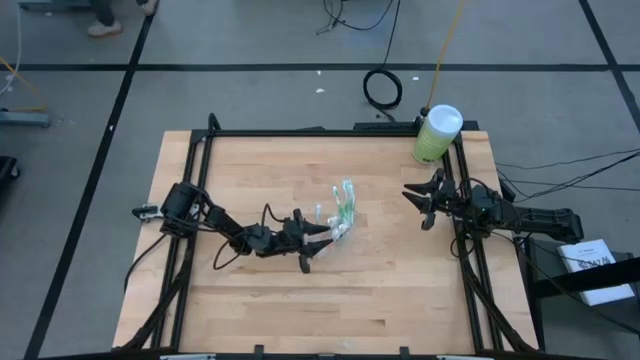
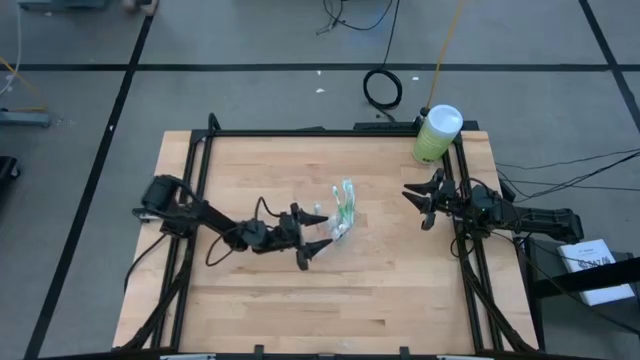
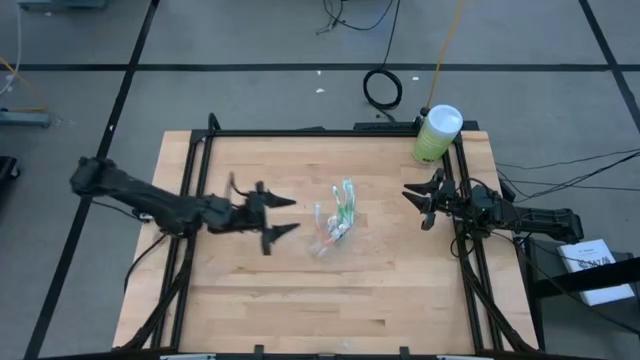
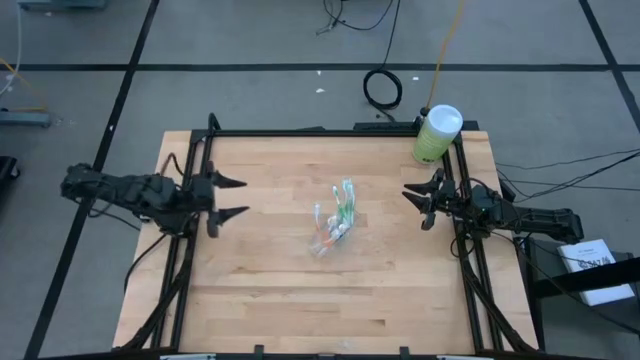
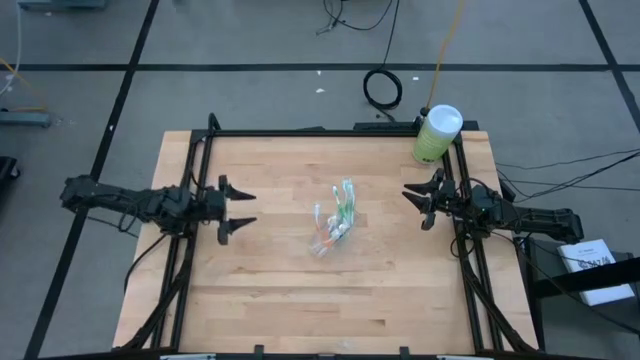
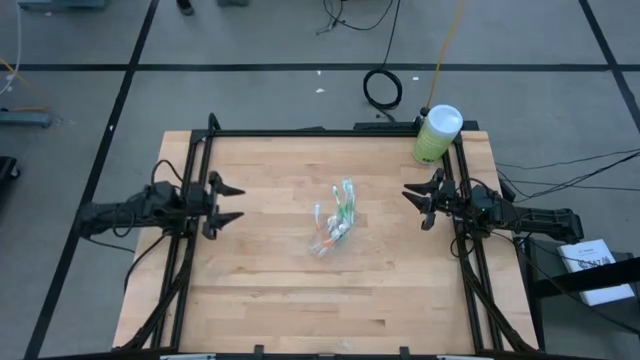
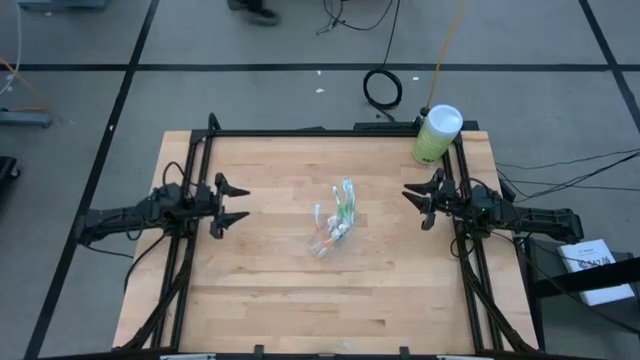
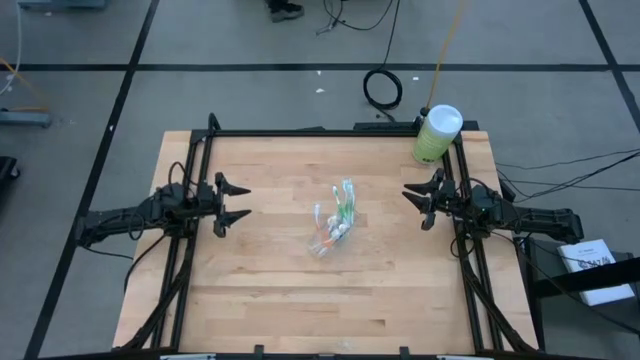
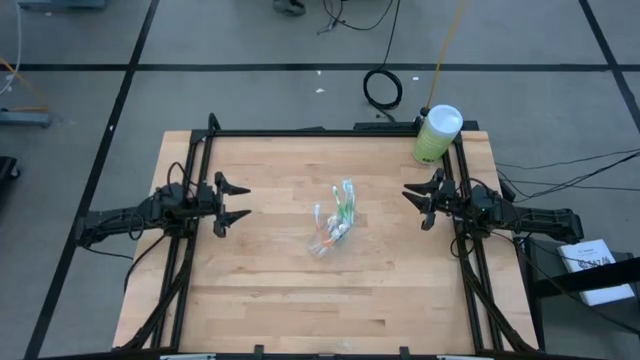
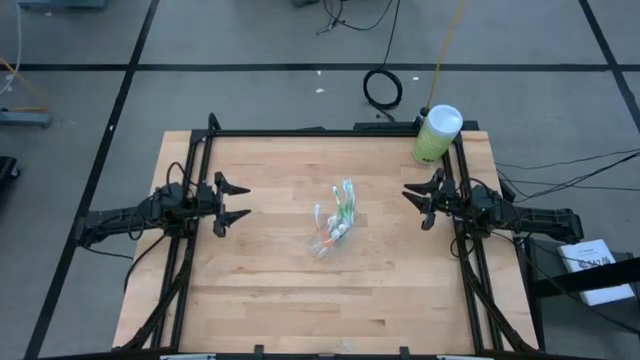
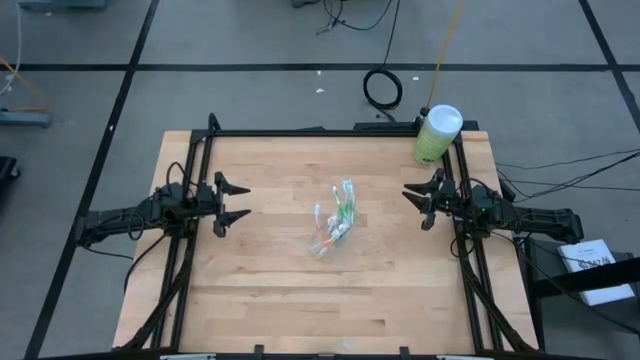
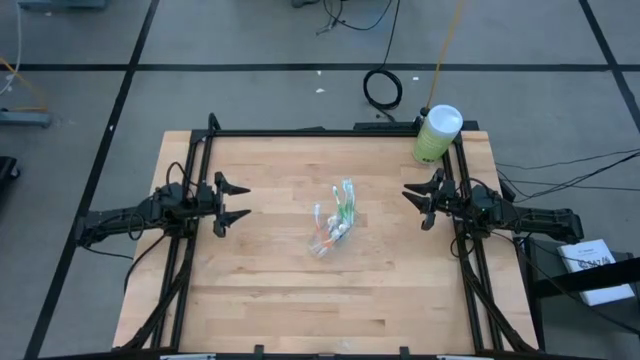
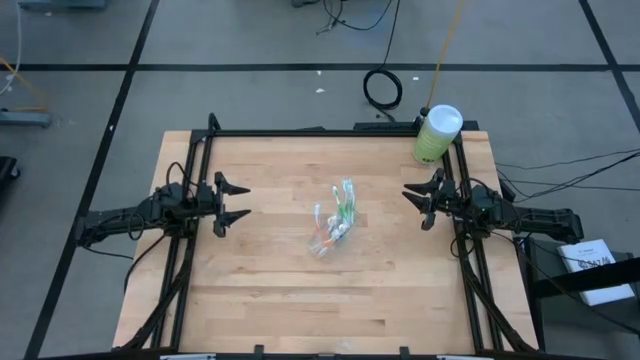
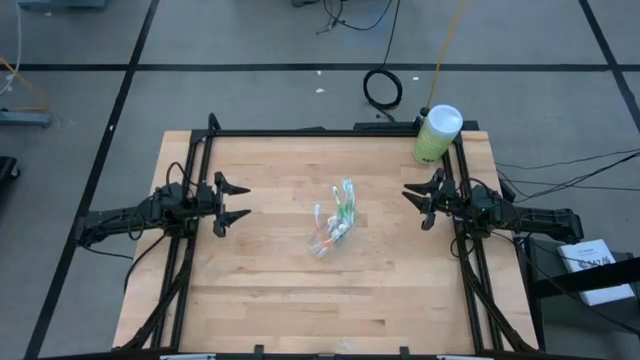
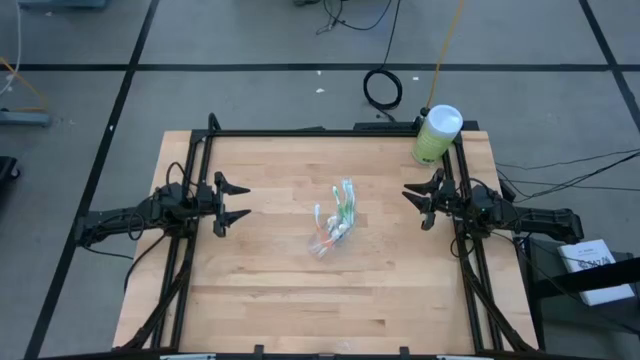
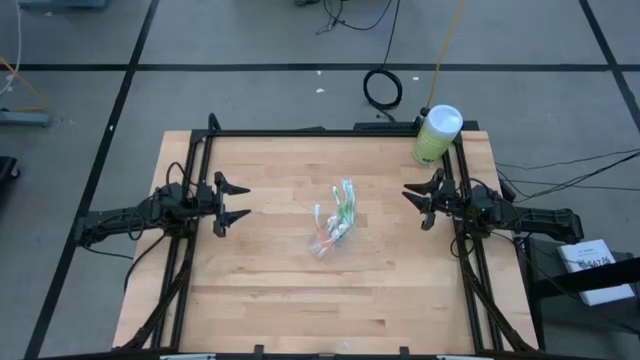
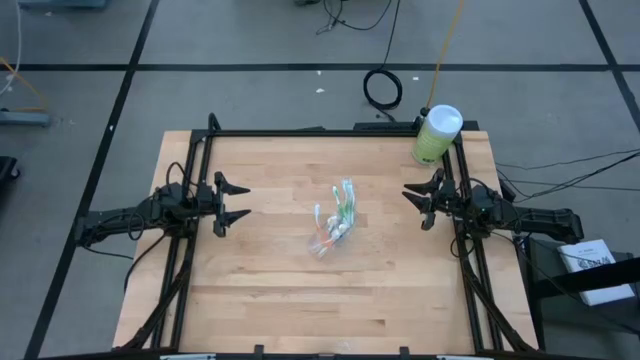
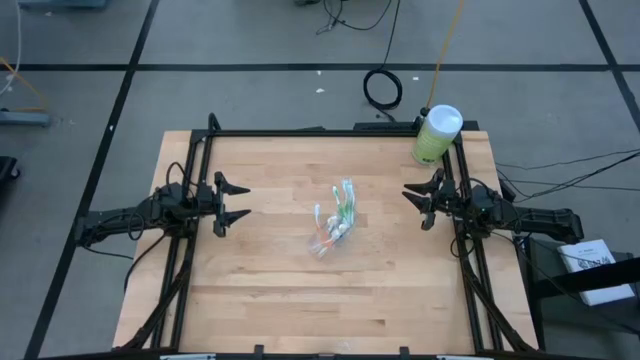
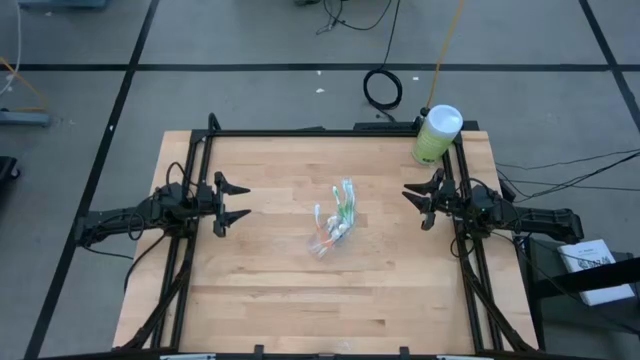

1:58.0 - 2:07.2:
Task: Pick & Place toothbrushing station
Return to Home Position

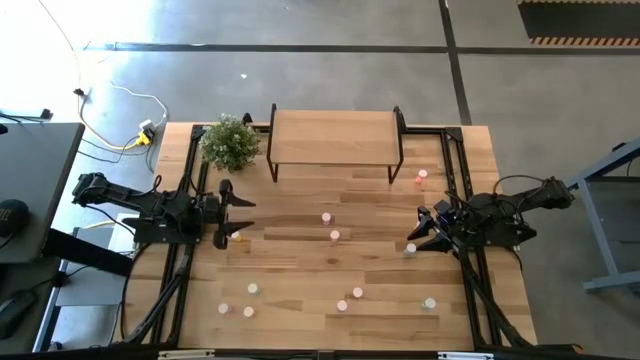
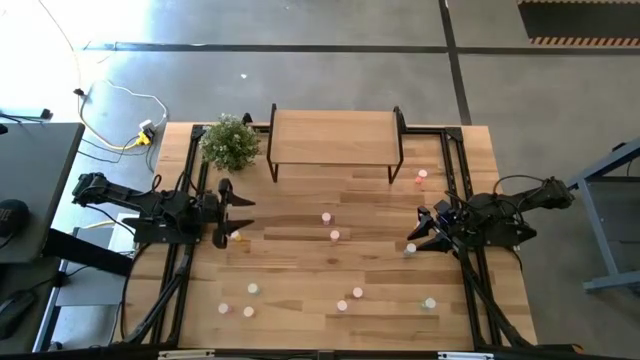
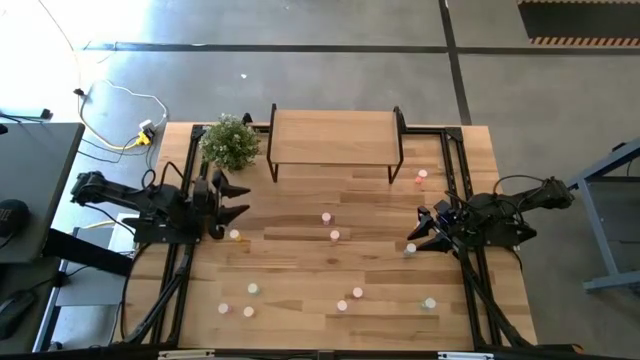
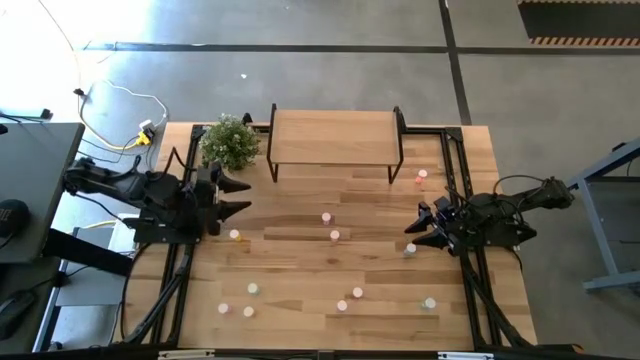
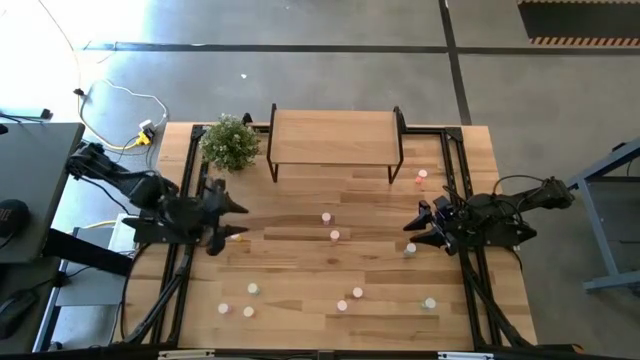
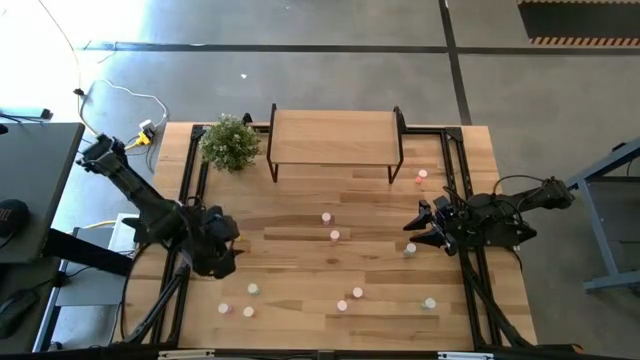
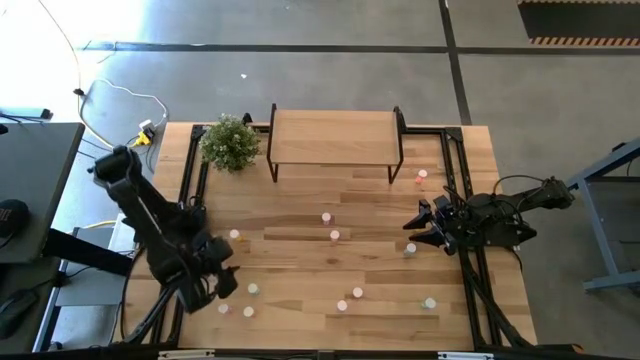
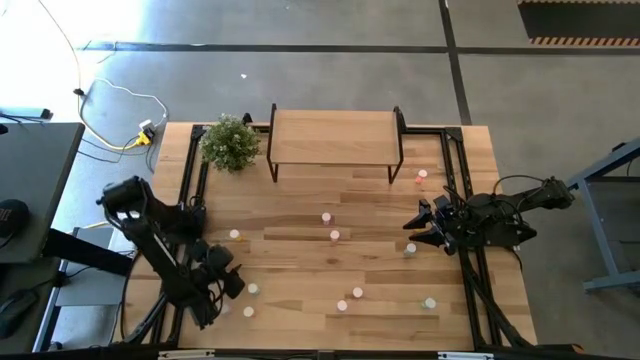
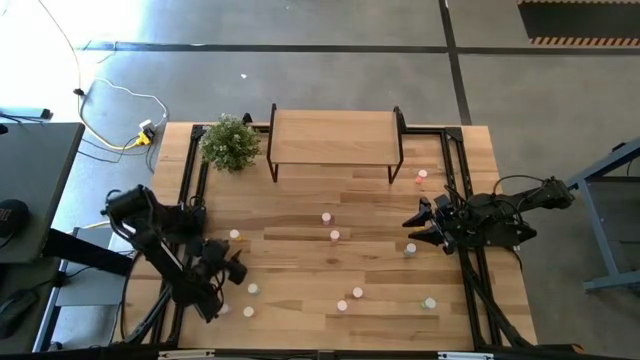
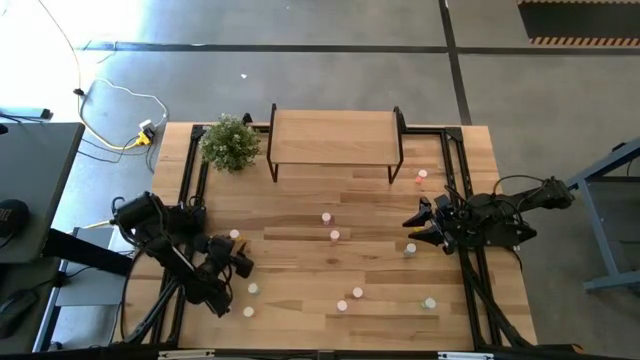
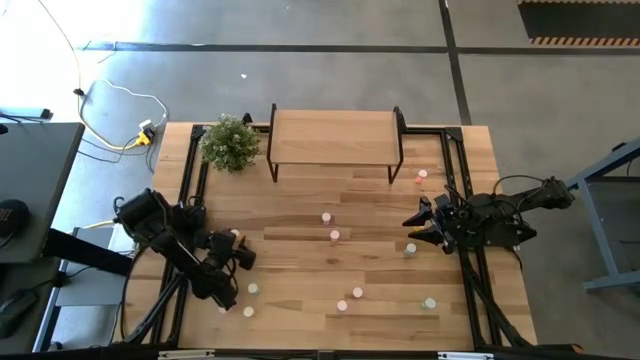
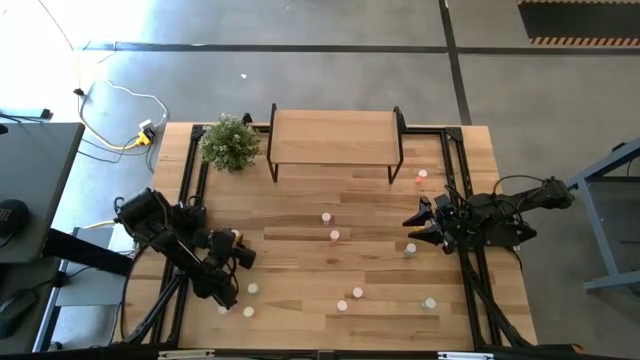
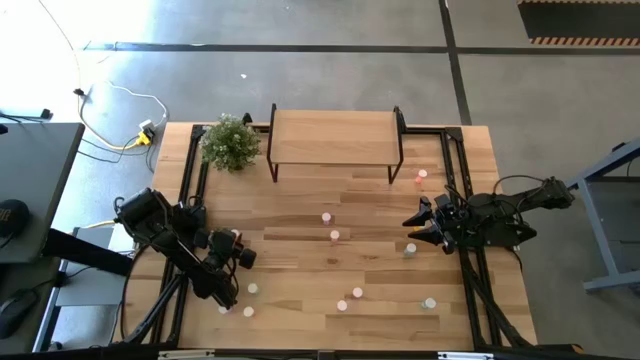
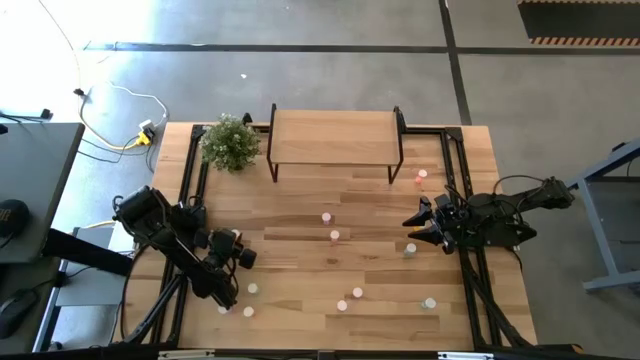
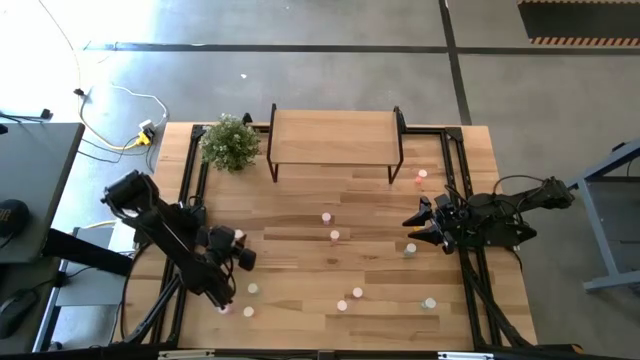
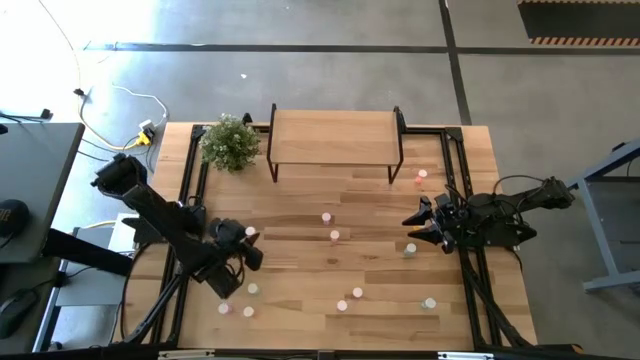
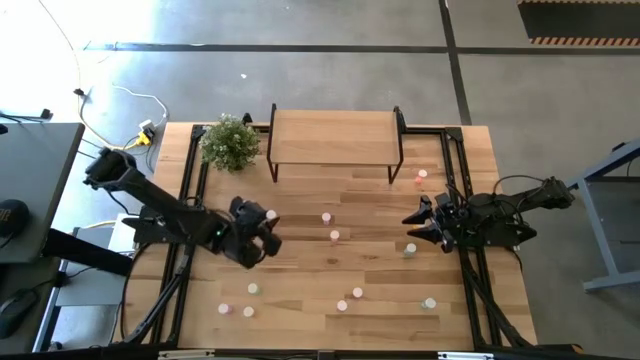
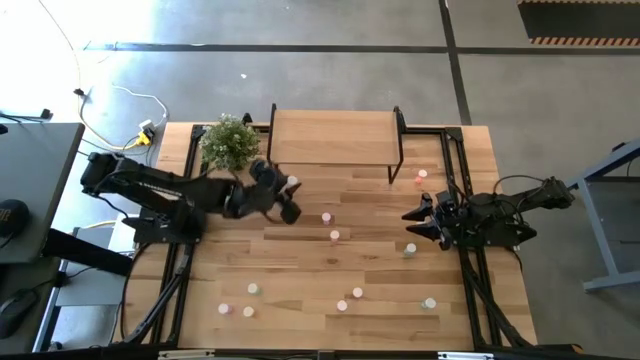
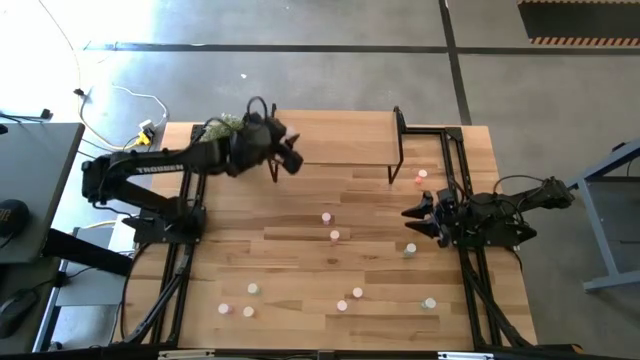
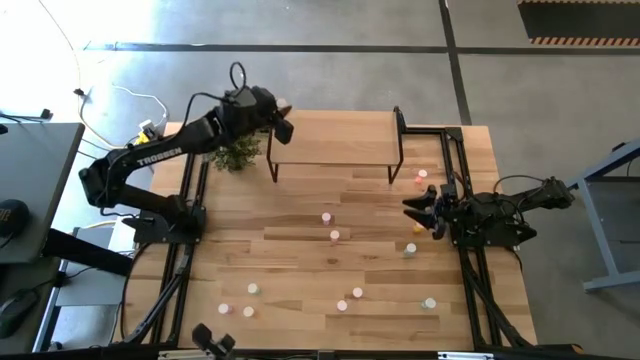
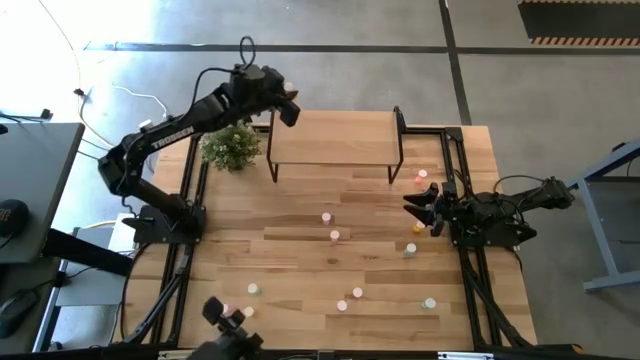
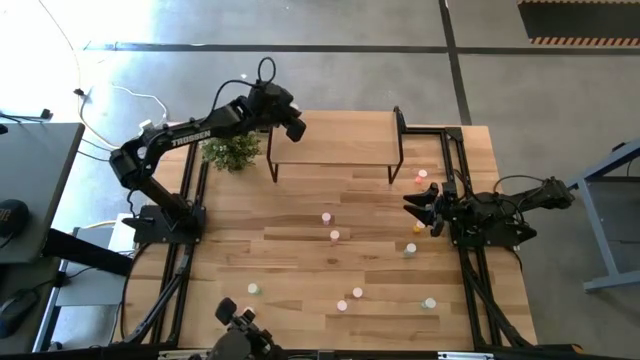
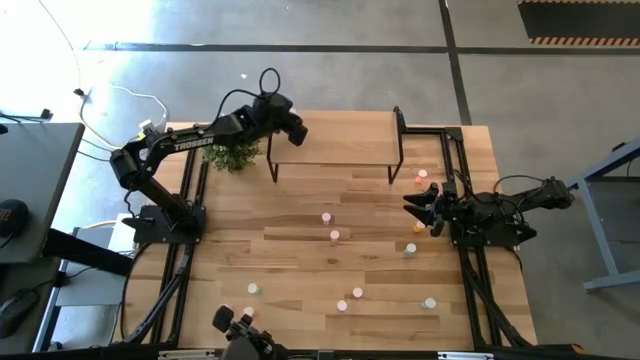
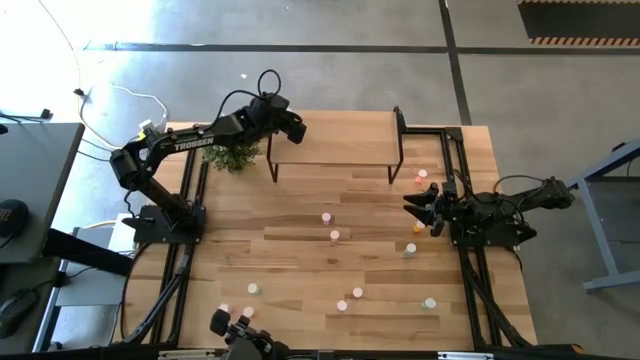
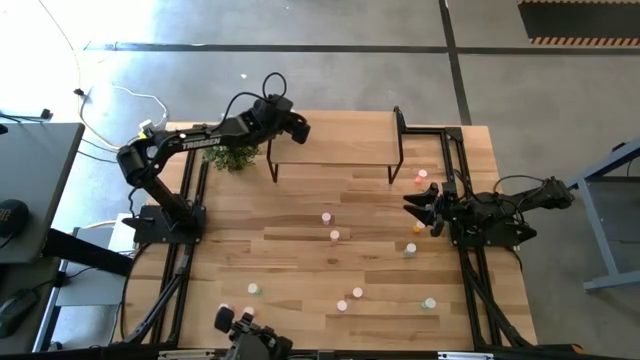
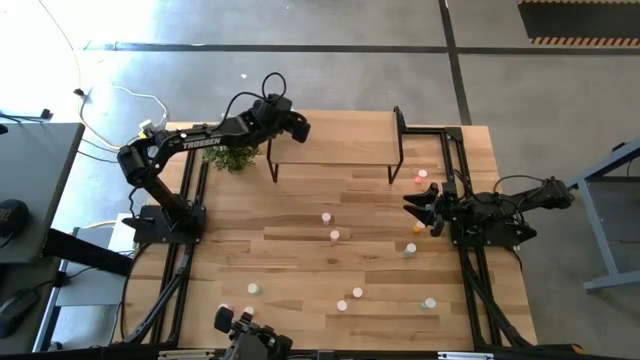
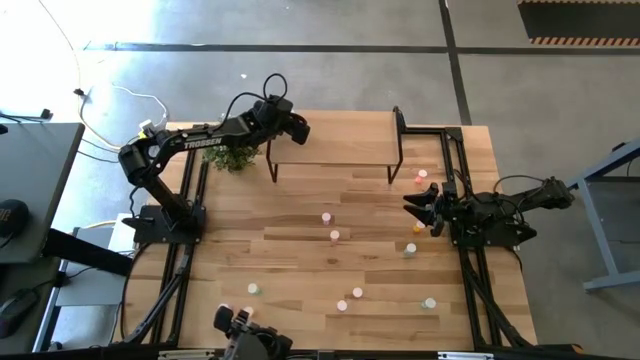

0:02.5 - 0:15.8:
Task: Pick and place medicine bottles onto shelf by color
Put the top left orange pill bottle on the shelf
